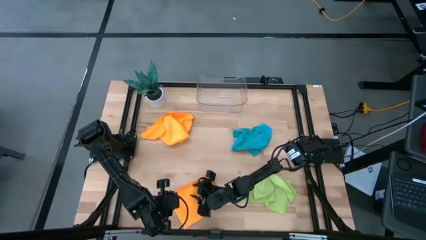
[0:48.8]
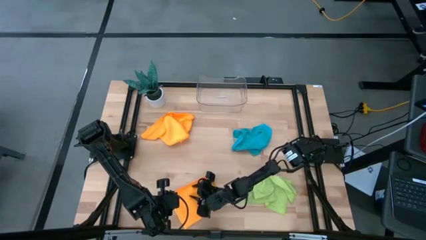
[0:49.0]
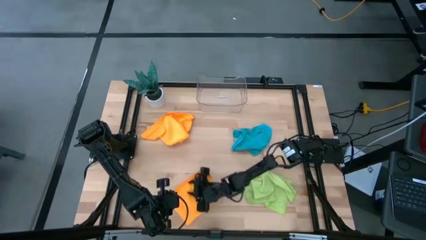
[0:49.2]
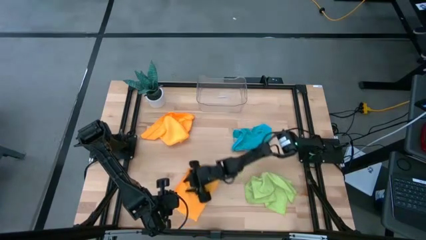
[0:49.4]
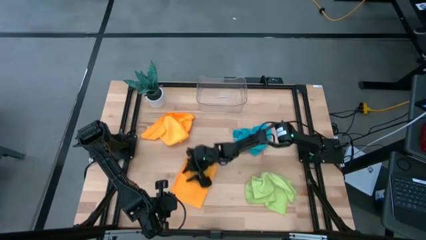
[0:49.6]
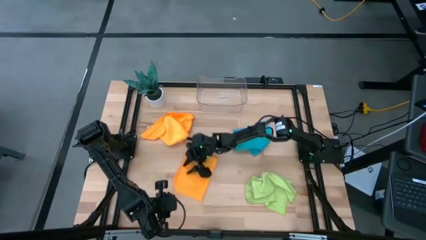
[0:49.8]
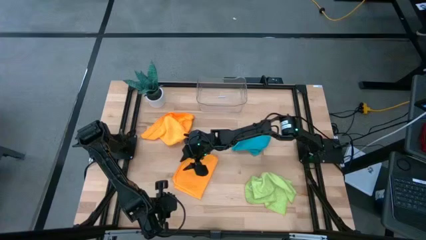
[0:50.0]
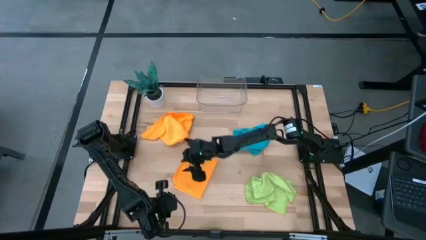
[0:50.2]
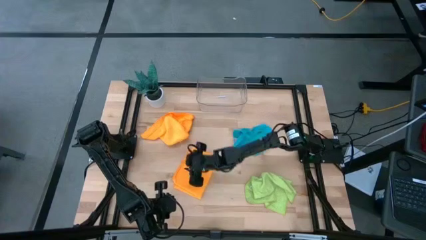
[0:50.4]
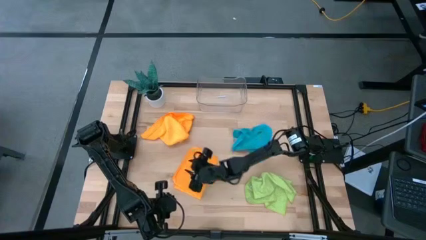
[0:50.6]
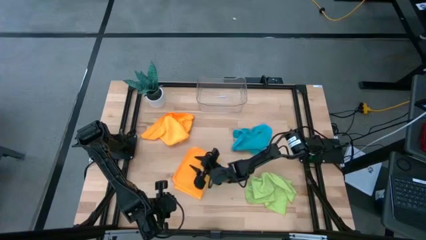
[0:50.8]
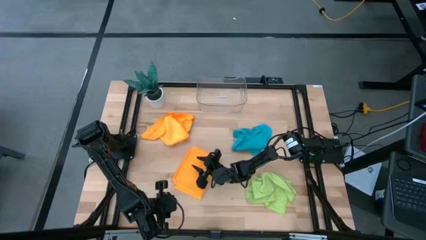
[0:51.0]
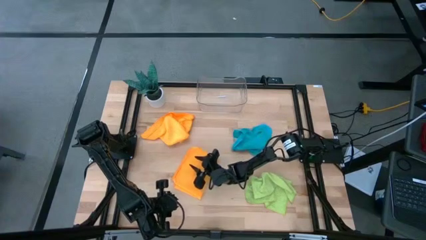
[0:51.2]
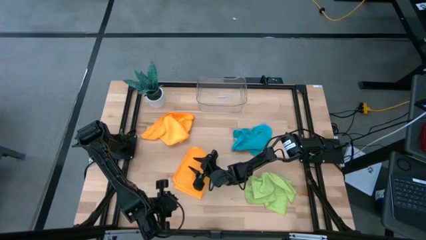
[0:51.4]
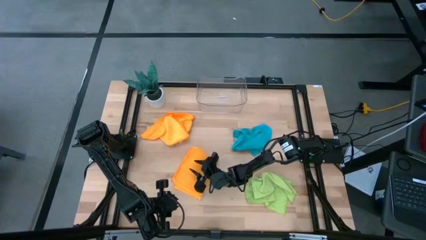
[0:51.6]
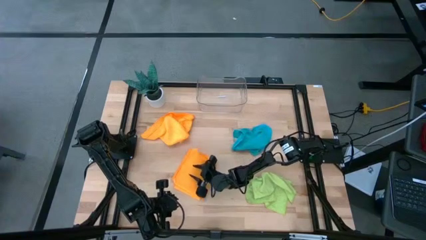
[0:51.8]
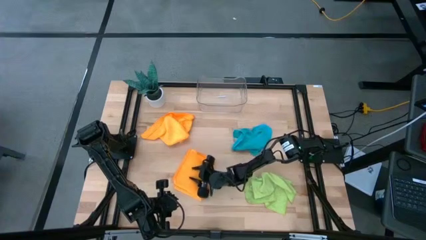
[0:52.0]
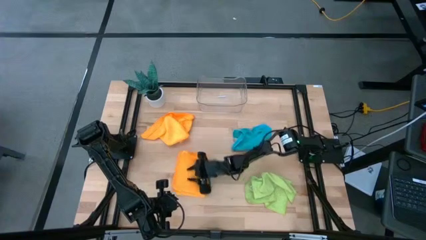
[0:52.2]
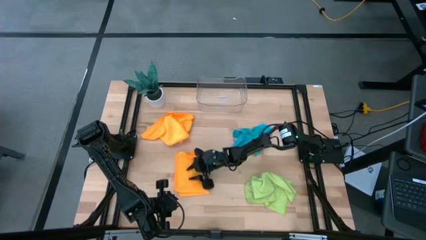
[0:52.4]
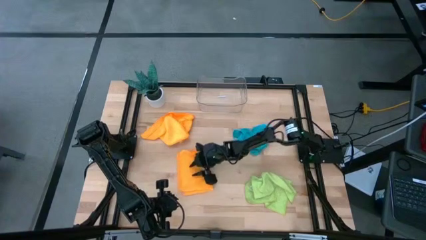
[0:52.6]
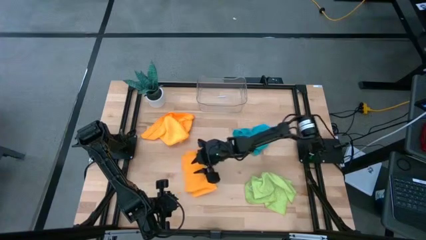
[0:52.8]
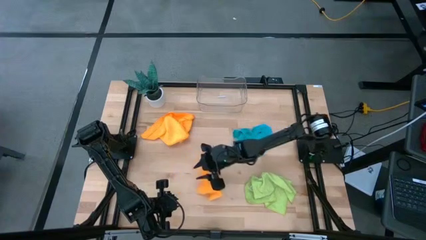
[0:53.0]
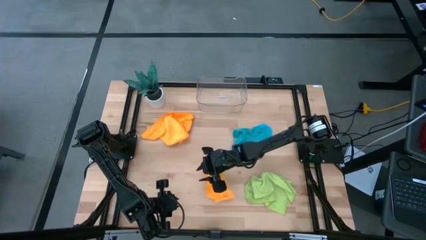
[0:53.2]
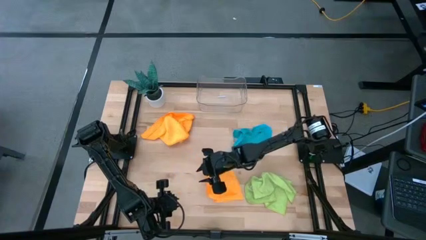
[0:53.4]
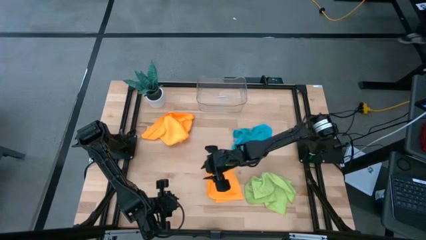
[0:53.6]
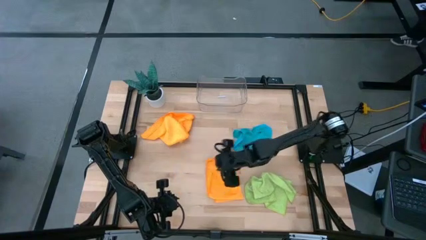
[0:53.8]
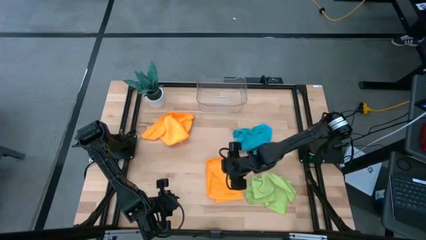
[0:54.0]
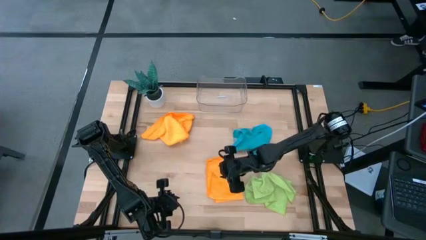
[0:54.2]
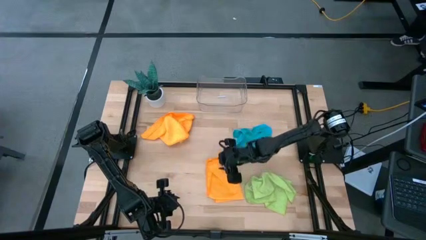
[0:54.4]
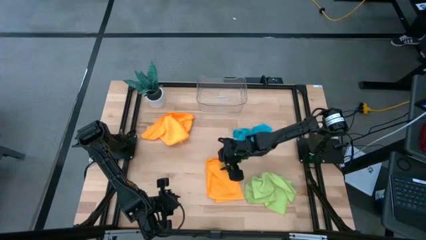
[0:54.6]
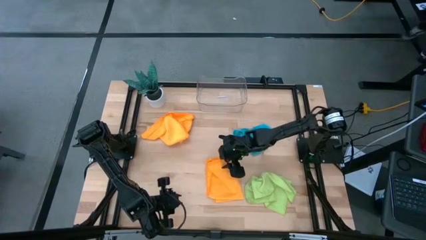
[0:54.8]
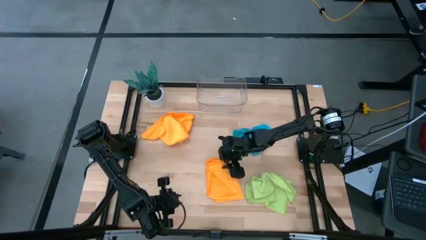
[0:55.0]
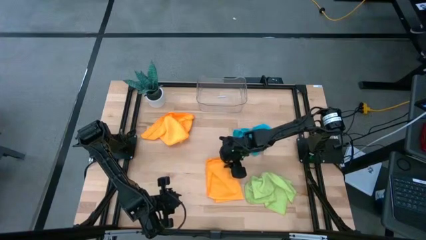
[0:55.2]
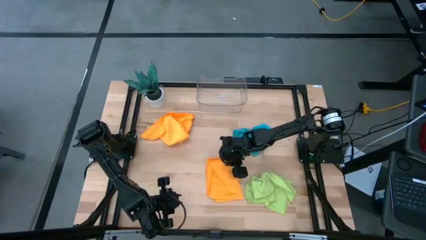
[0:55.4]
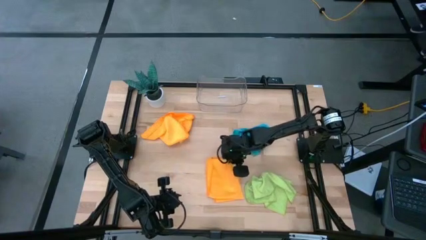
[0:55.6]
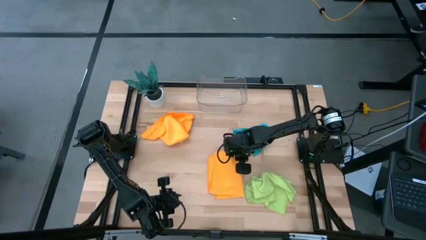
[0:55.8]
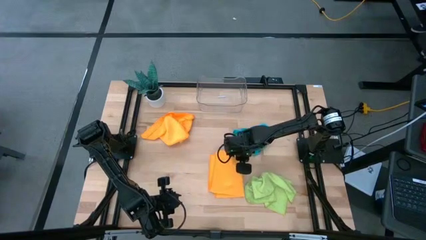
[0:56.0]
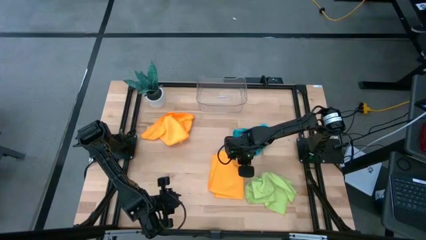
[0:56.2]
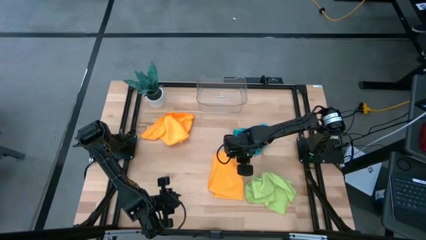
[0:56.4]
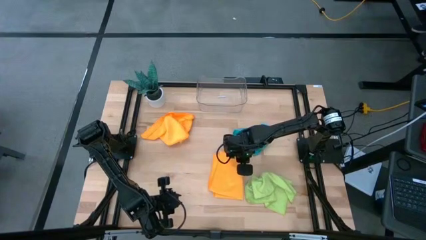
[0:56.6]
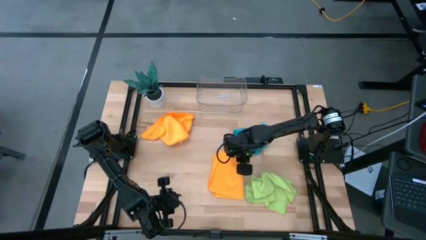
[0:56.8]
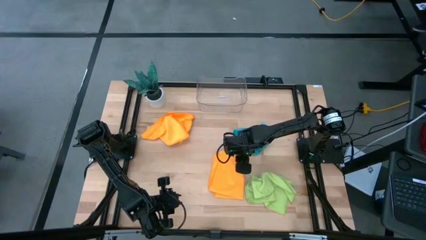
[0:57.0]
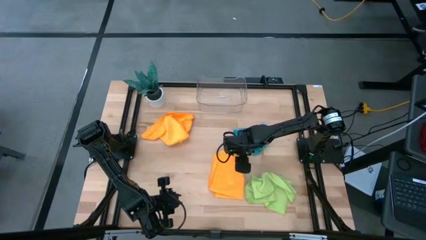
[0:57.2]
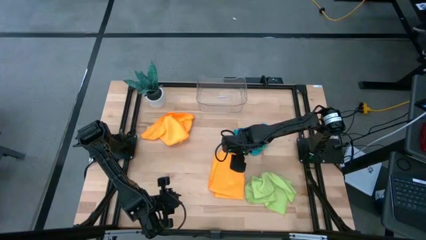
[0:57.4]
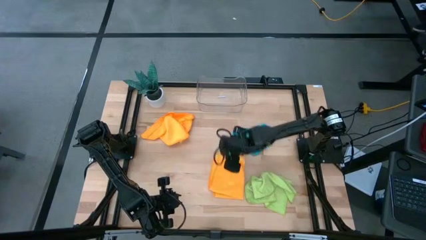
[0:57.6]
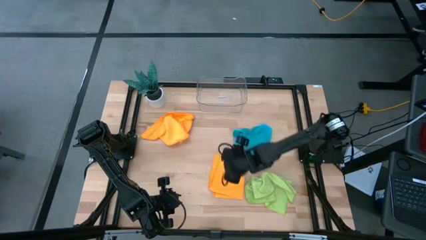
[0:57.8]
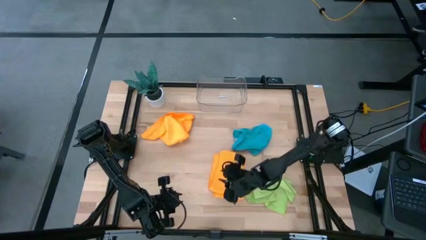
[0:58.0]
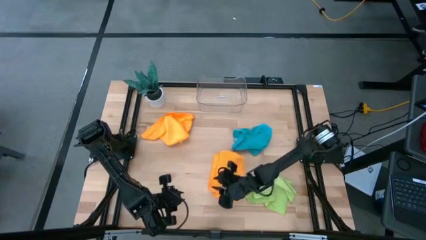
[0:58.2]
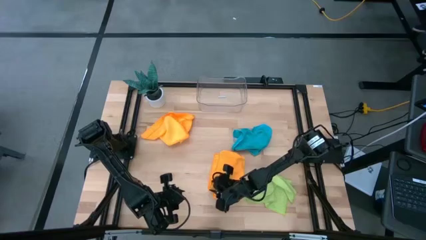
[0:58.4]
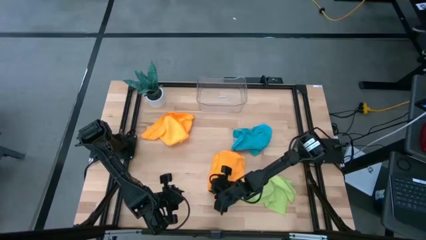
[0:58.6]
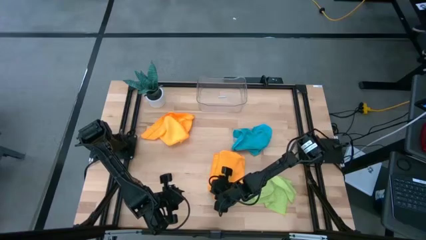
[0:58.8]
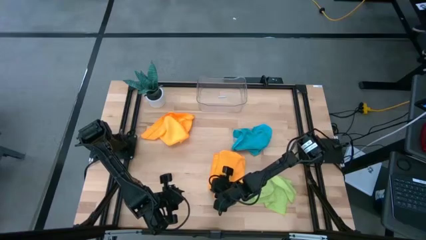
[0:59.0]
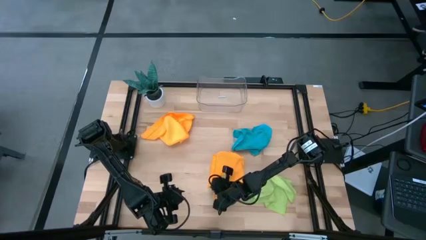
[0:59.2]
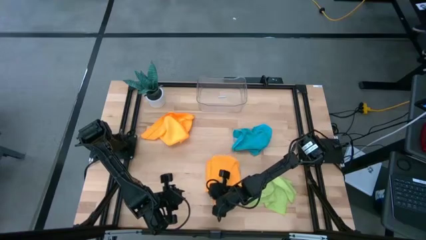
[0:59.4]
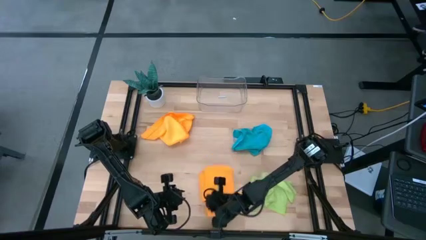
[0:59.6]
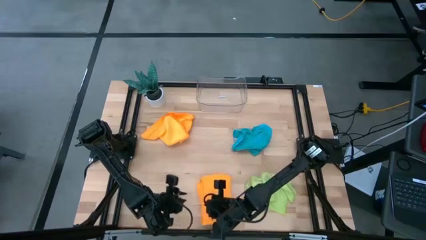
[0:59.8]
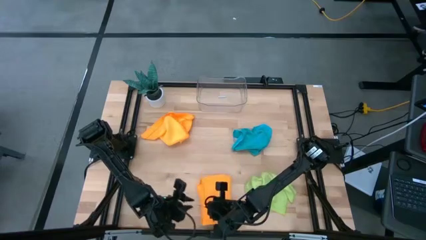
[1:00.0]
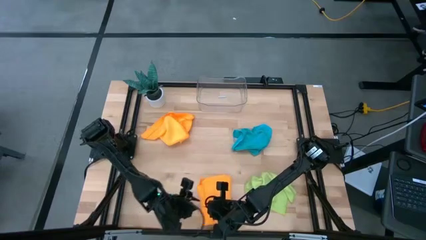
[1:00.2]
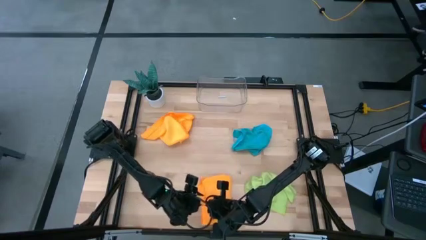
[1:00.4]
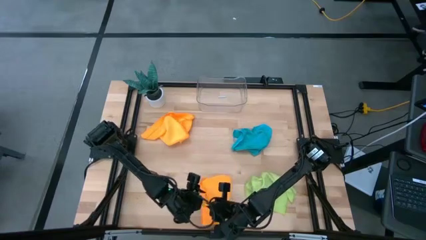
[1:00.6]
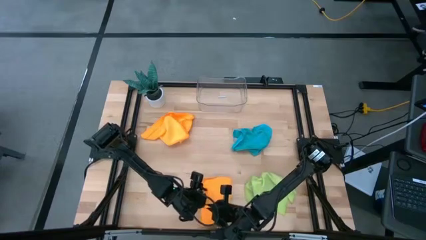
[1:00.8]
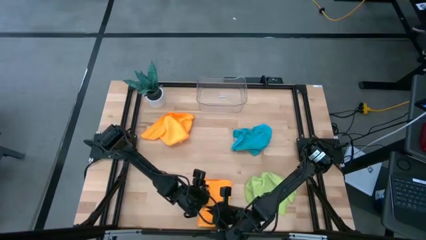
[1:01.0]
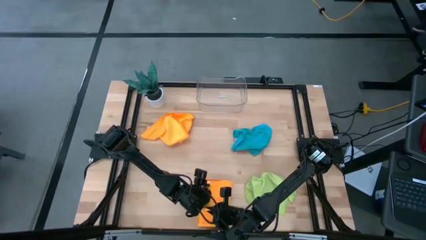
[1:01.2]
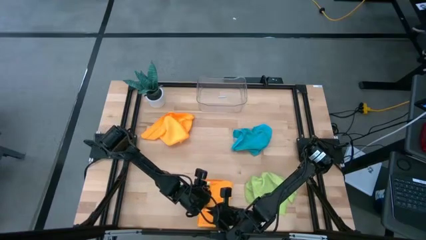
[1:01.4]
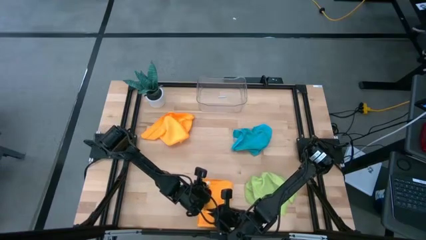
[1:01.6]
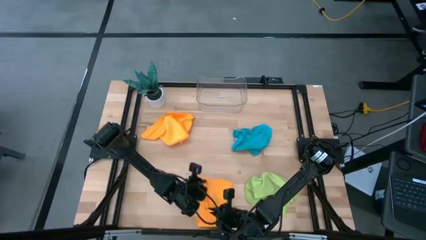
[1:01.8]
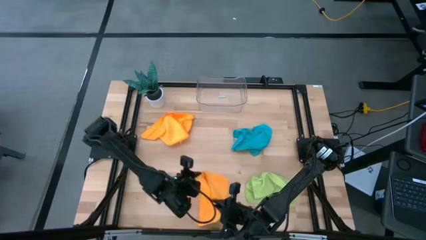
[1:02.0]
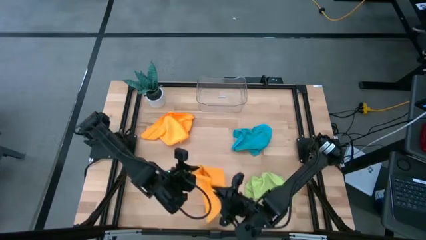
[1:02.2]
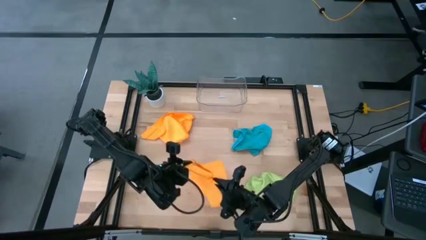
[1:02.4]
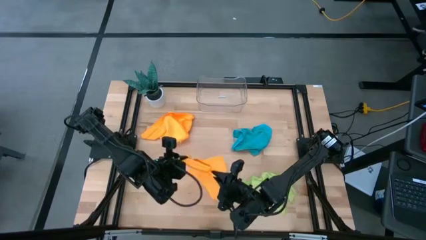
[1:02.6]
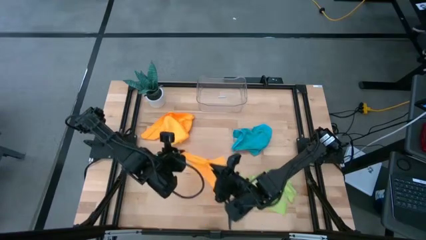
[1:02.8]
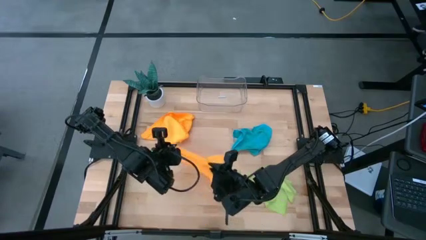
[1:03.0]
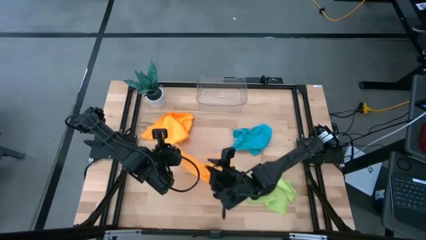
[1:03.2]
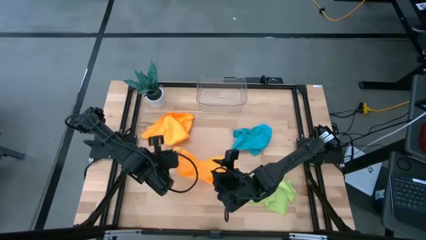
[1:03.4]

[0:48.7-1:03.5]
Task: Fold microfiber towels
Fold the bottom orange microfiber towel
